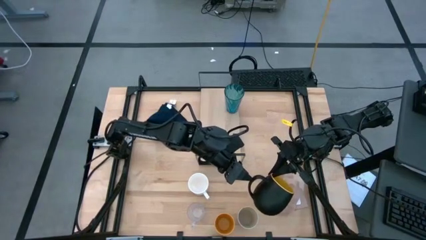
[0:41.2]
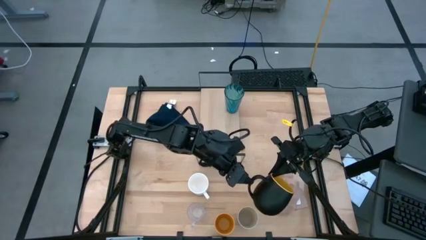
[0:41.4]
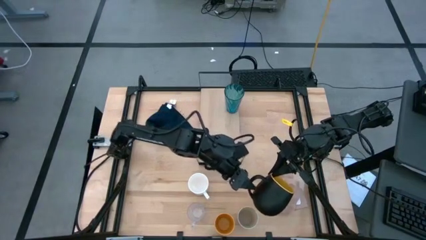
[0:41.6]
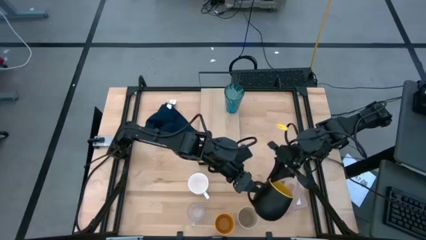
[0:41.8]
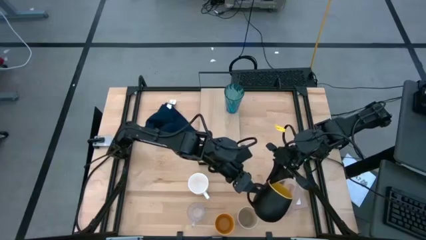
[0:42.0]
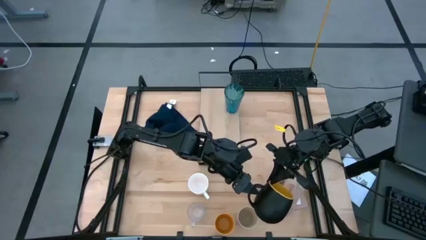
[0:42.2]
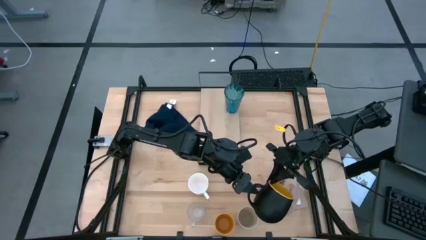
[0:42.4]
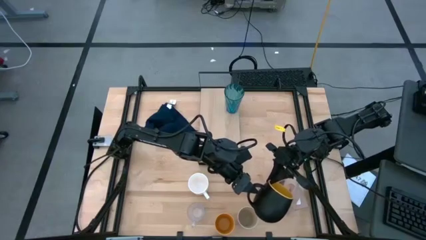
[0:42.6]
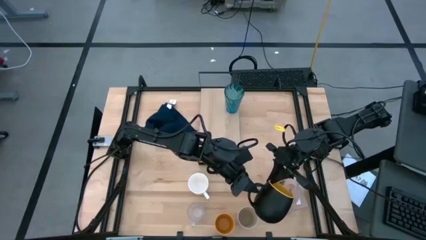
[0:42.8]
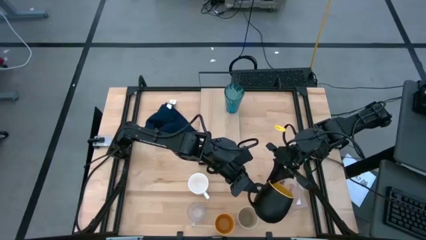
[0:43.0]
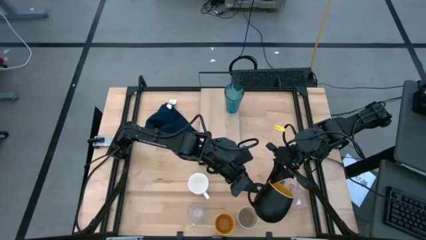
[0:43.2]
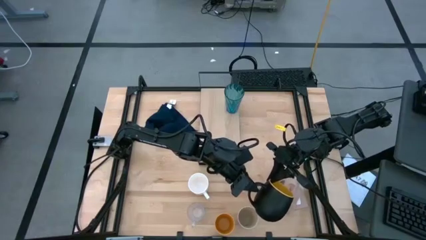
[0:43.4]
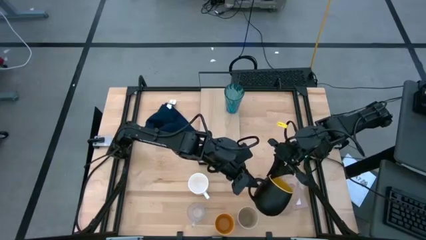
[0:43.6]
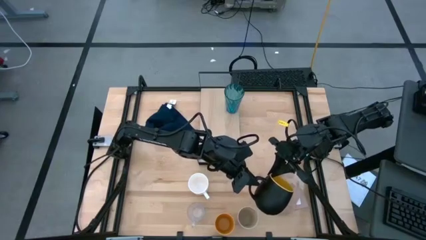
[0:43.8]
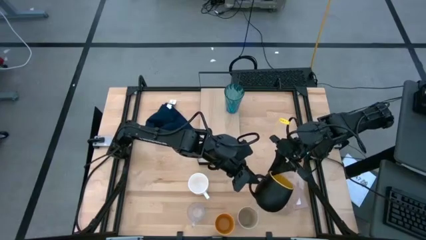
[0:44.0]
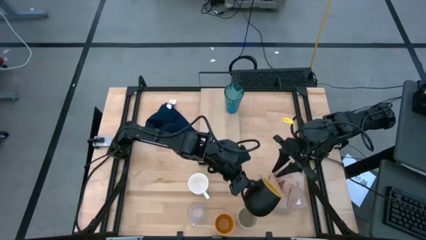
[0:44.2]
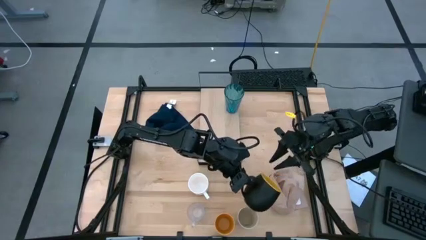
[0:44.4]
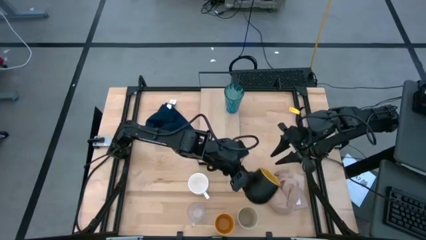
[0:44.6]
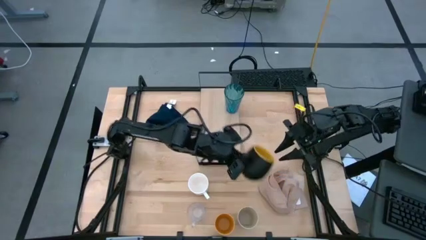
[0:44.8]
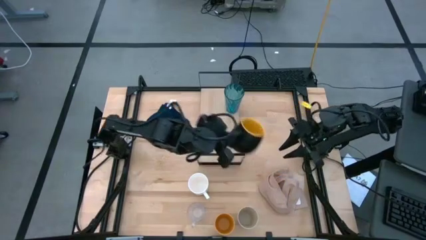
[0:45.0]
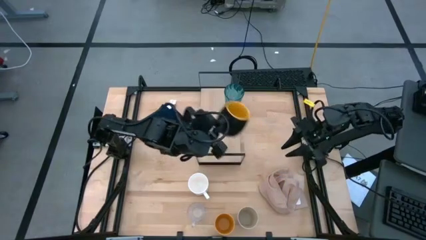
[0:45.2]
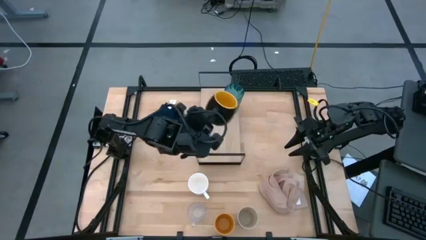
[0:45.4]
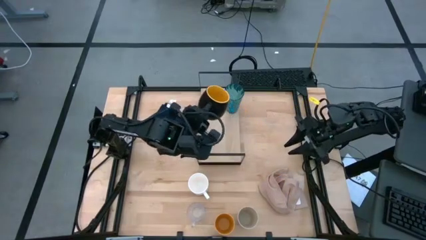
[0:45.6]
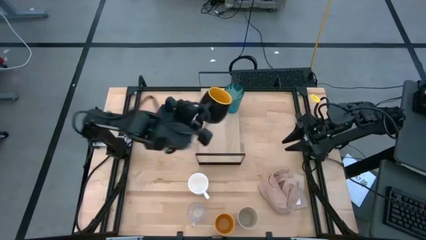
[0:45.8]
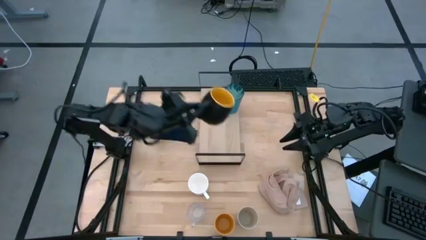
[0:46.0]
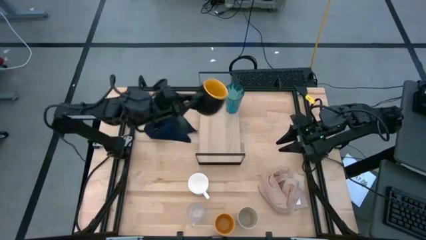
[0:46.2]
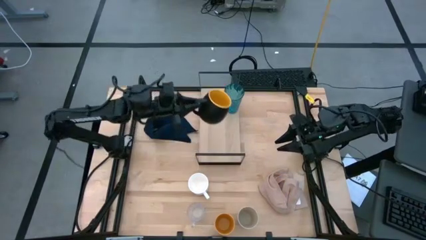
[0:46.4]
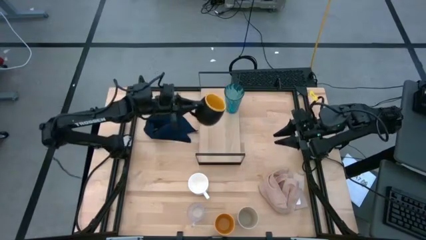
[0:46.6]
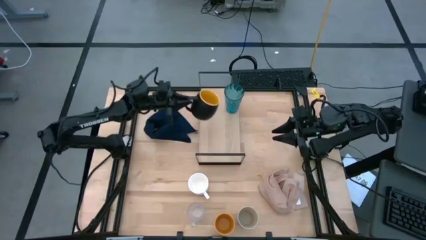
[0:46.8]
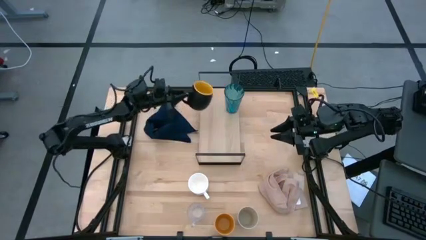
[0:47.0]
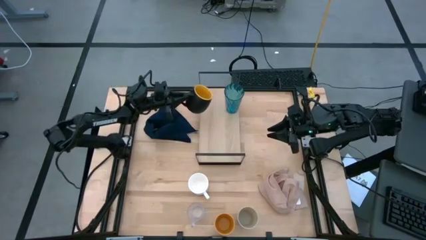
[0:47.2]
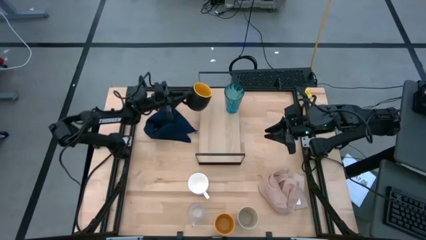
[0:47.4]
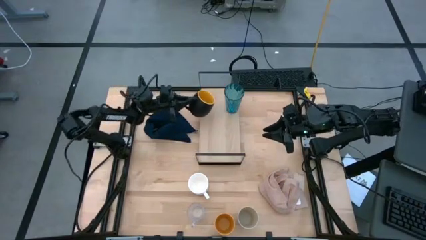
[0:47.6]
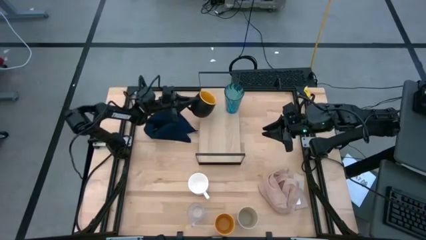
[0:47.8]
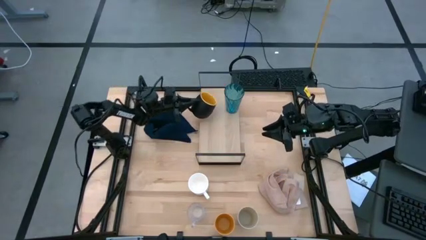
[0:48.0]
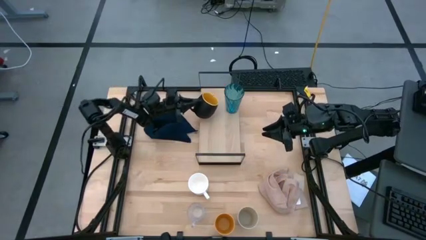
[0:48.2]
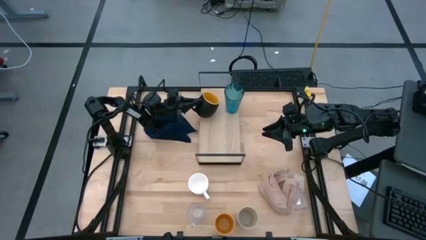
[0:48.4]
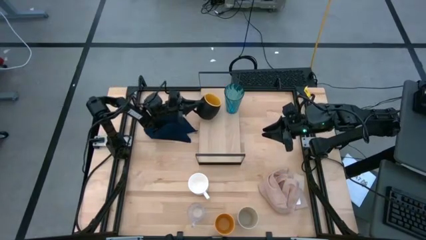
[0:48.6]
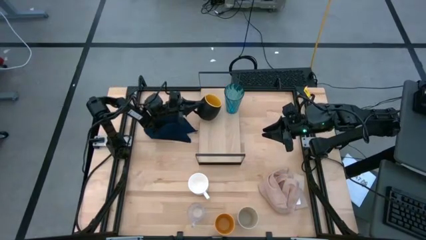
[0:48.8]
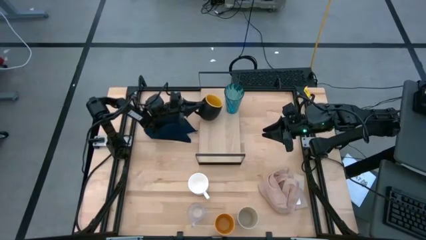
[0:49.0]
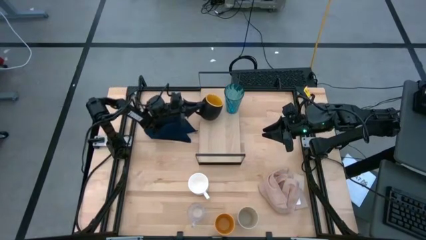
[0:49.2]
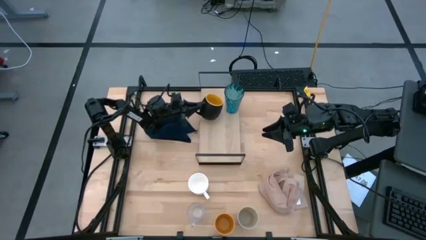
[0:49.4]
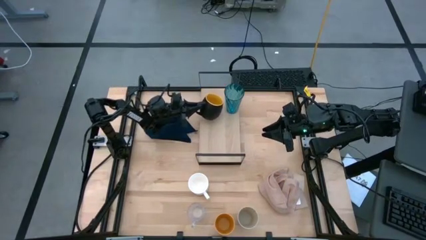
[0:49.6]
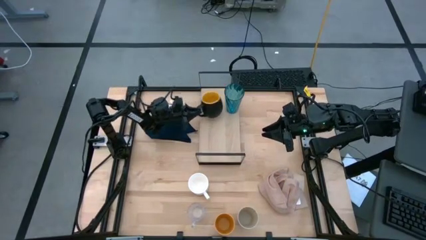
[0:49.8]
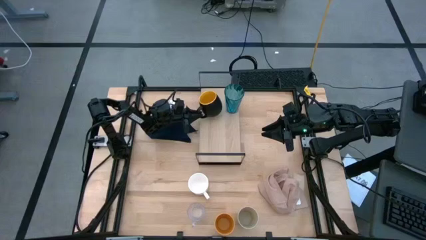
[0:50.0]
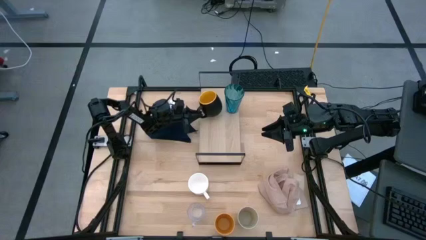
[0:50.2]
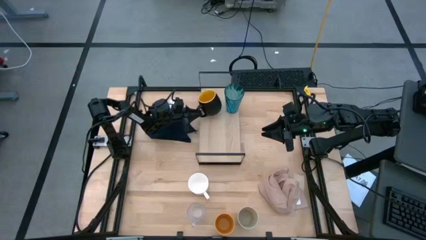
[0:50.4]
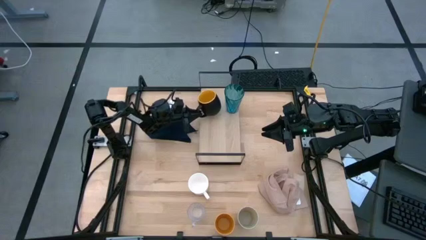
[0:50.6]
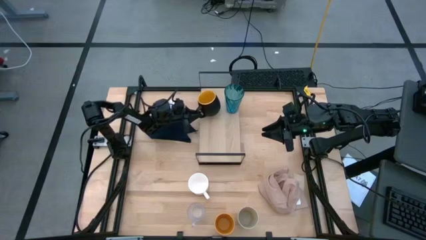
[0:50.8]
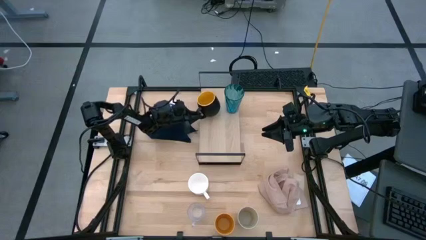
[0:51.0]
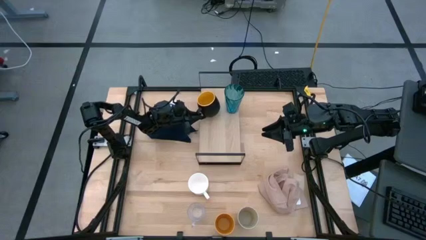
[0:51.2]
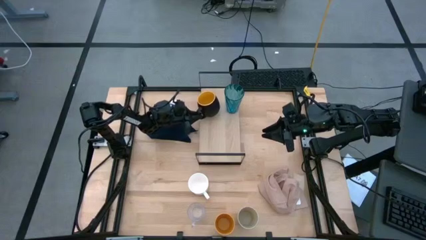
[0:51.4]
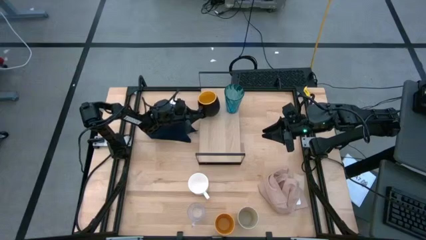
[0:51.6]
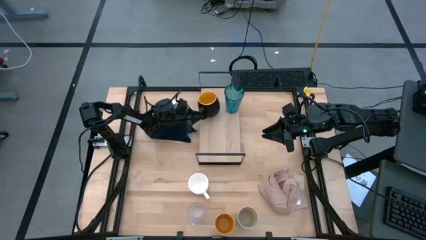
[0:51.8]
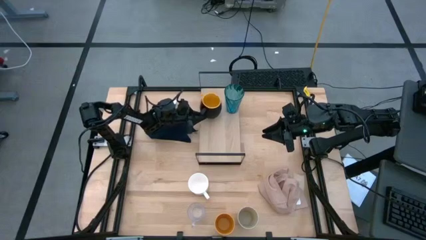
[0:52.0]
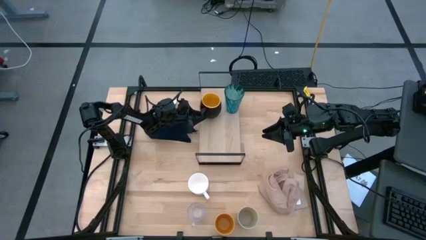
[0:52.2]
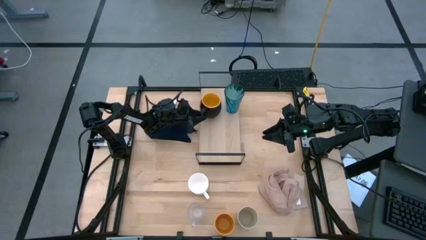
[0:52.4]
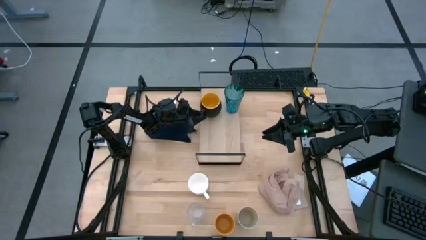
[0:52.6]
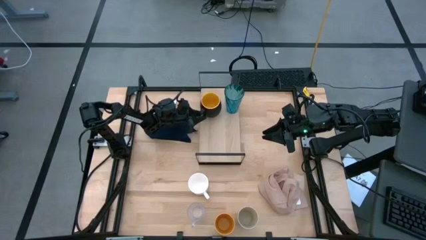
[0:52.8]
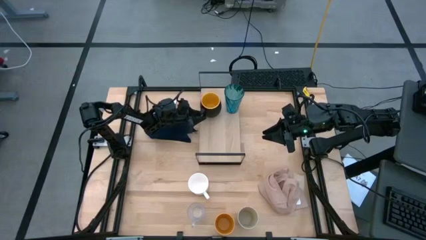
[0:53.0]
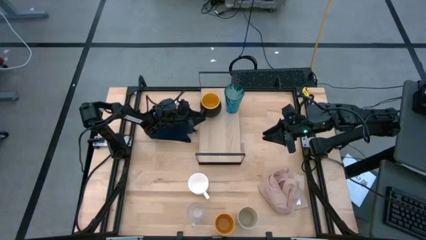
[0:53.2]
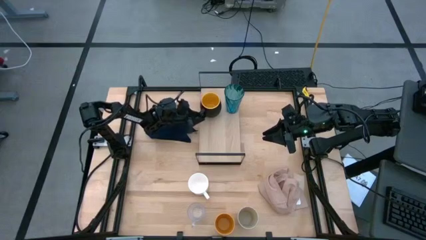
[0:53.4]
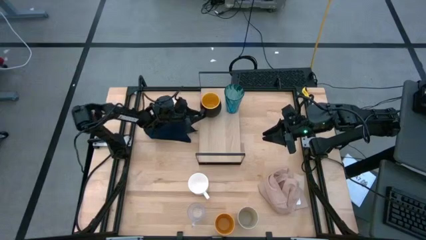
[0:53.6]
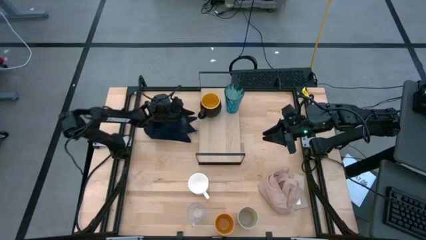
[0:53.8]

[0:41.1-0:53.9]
Task: Stack small to large cups/mugs on shelf
Put the black mug on the shelf

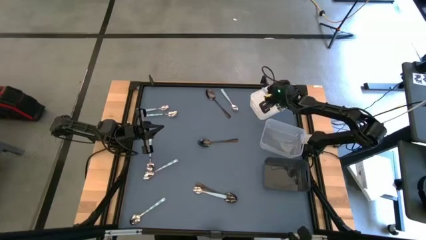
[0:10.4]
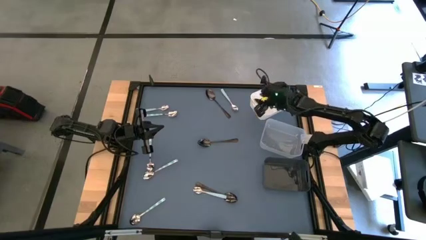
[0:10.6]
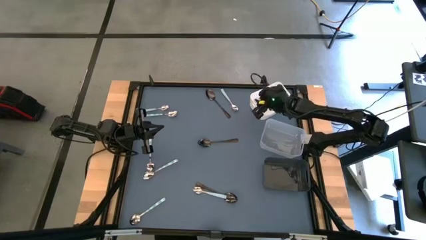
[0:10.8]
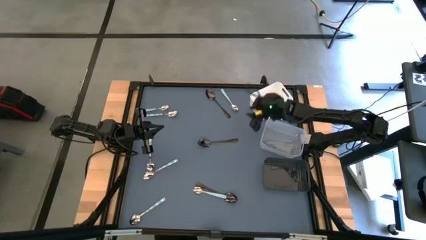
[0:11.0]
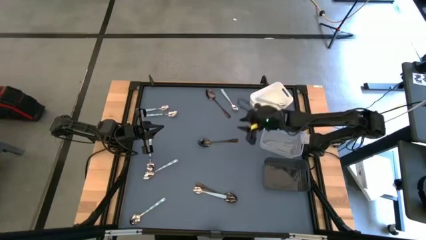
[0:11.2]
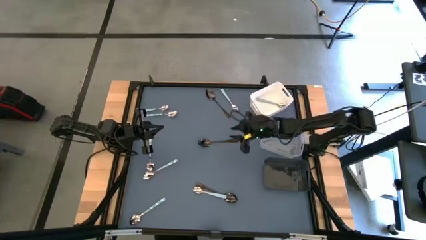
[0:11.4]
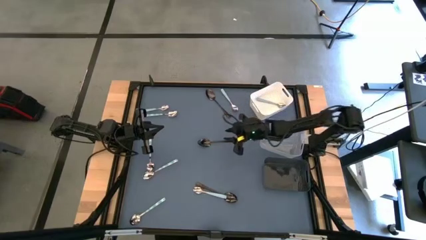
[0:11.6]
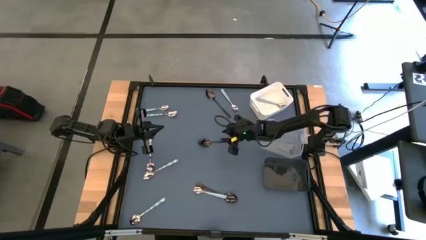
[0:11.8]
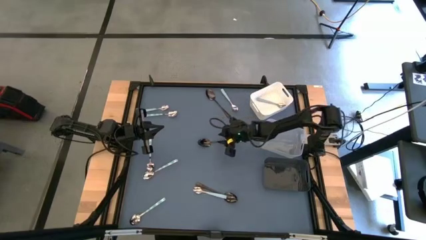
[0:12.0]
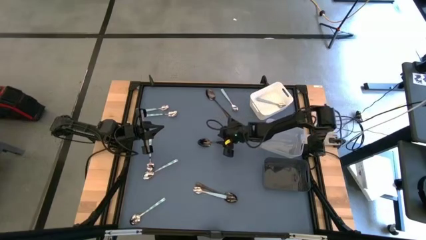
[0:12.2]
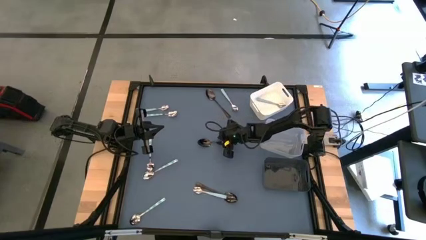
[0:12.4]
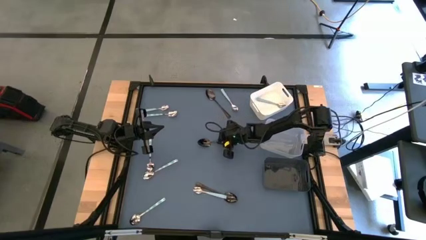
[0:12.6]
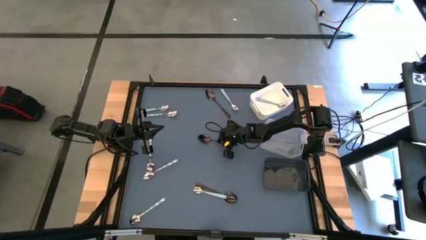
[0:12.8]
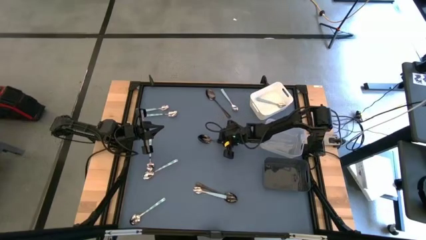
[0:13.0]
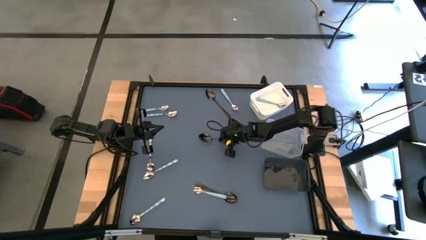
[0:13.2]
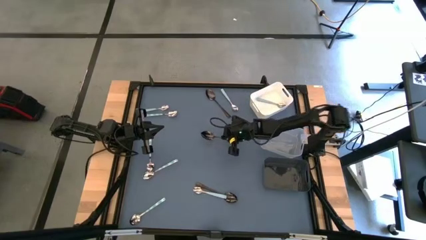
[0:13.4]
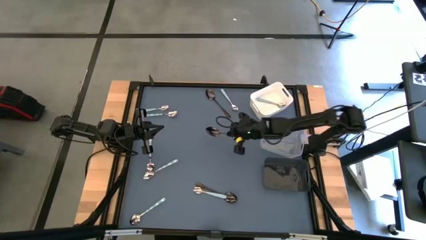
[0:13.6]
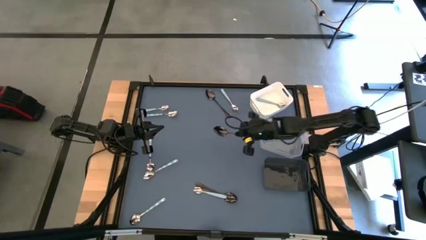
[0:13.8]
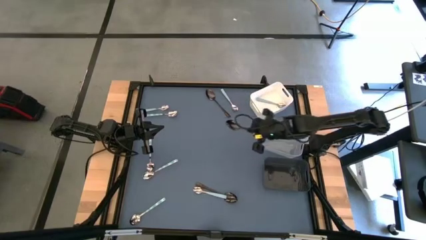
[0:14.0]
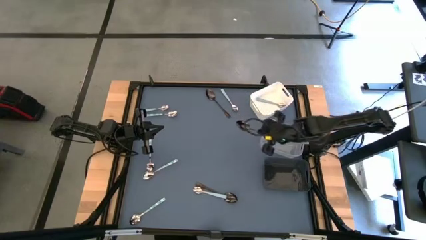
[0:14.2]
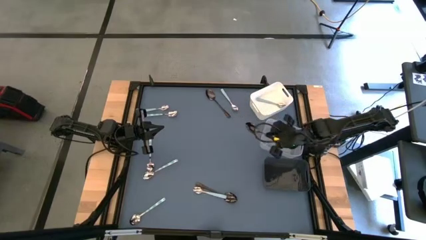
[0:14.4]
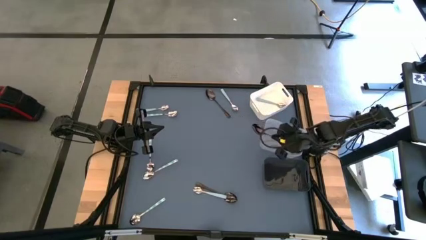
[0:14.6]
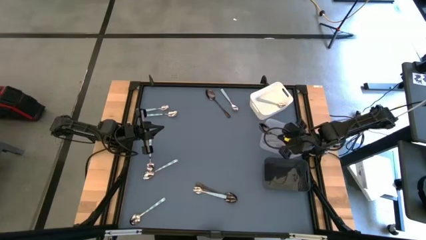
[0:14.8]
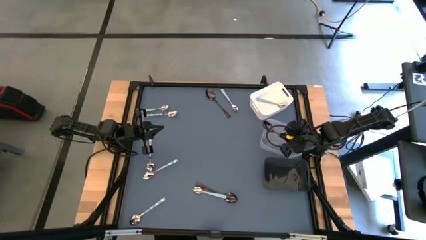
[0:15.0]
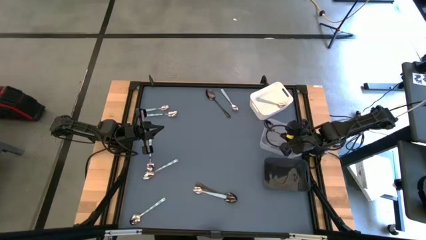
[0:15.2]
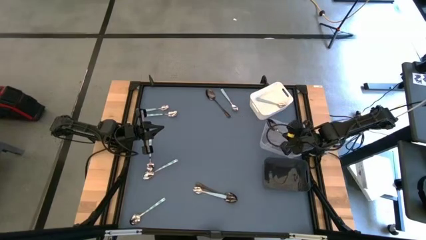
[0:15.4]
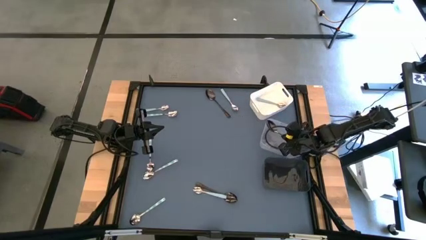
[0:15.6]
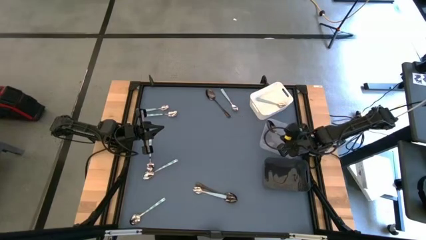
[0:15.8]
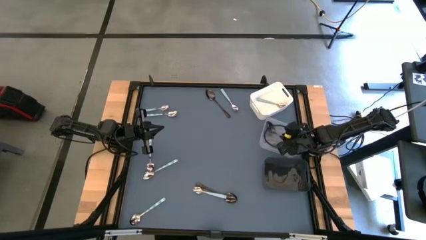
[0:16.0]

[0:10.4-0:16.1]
Task: Sort silverware by color (type)
Put the center black spoon into the transparent bin
